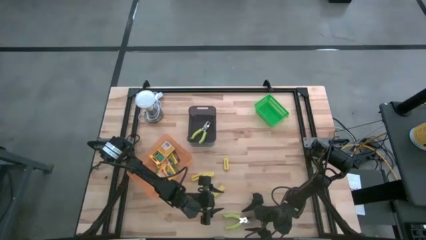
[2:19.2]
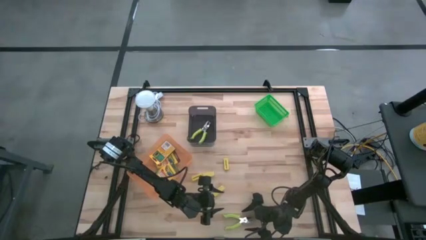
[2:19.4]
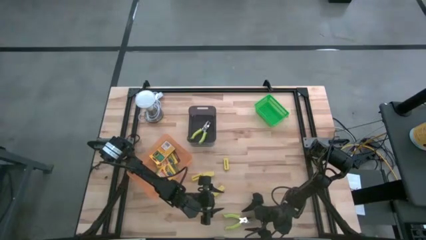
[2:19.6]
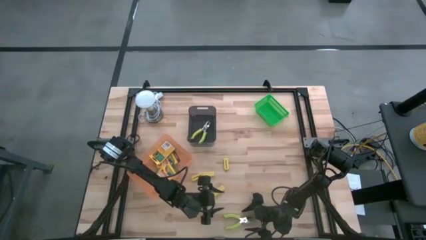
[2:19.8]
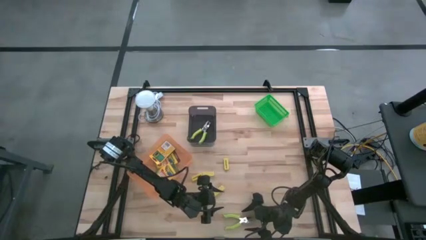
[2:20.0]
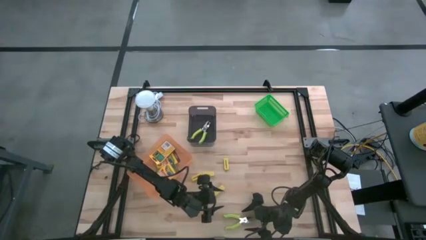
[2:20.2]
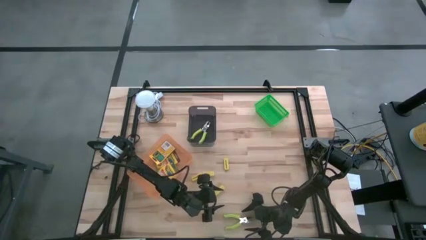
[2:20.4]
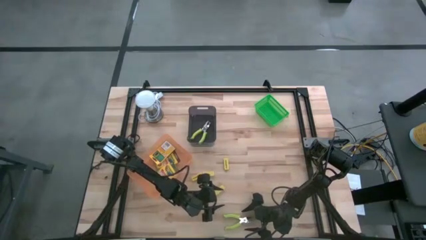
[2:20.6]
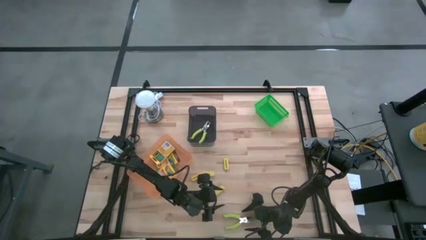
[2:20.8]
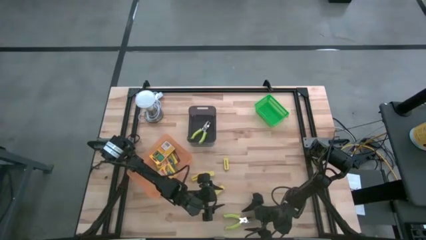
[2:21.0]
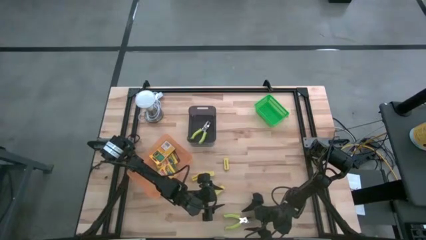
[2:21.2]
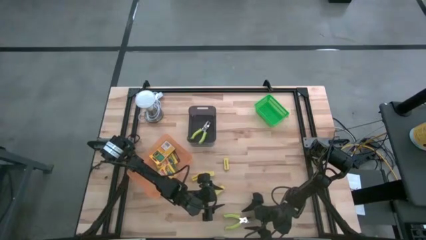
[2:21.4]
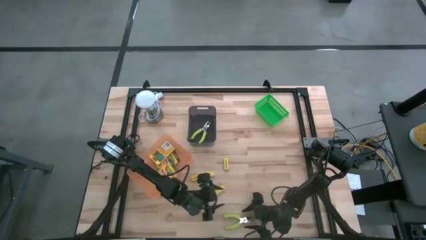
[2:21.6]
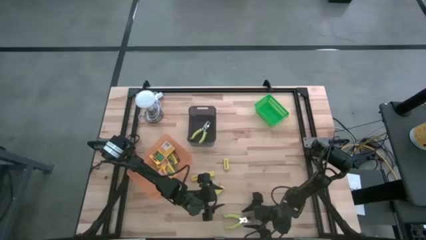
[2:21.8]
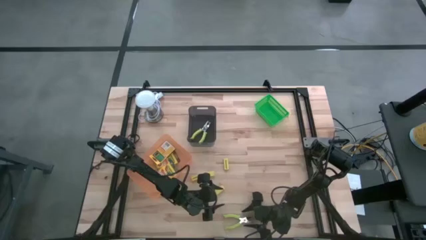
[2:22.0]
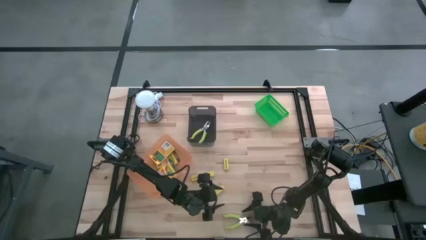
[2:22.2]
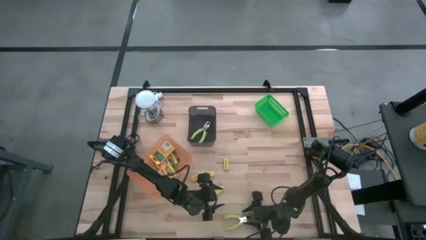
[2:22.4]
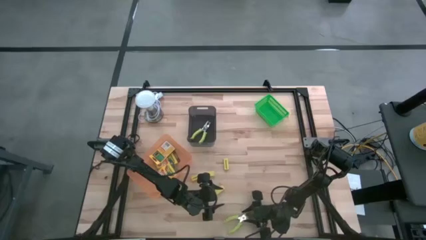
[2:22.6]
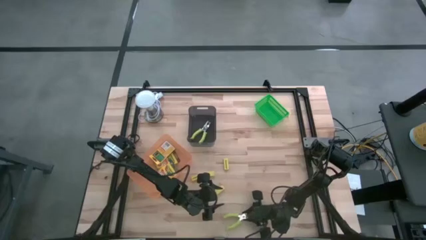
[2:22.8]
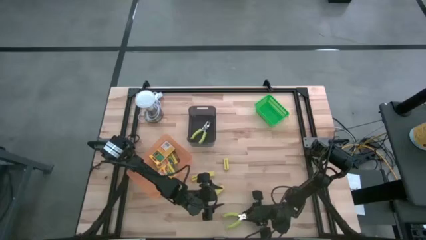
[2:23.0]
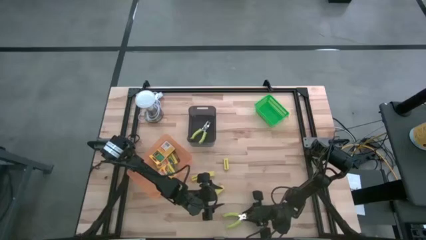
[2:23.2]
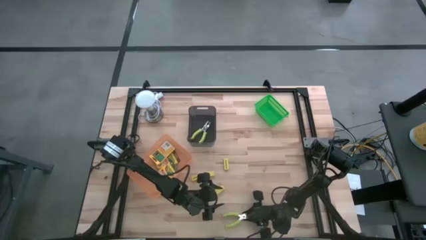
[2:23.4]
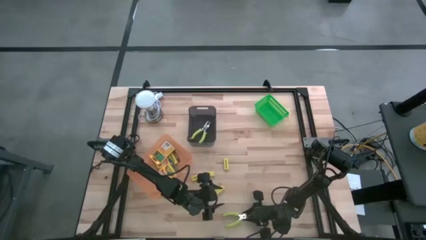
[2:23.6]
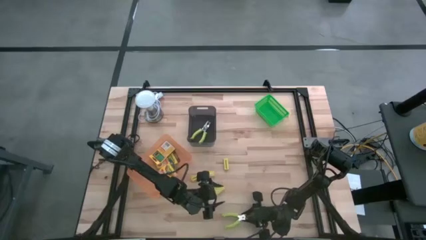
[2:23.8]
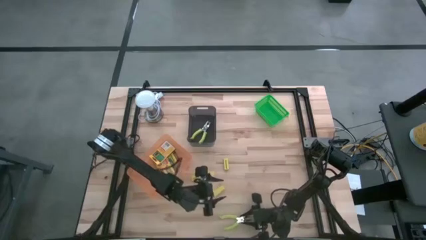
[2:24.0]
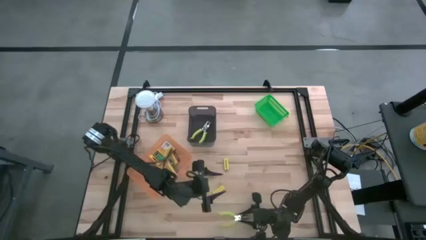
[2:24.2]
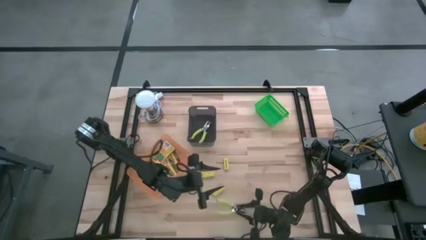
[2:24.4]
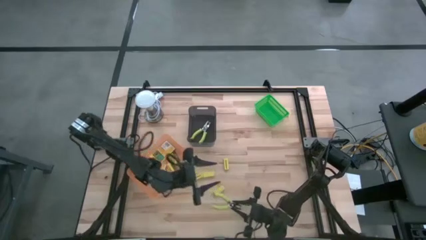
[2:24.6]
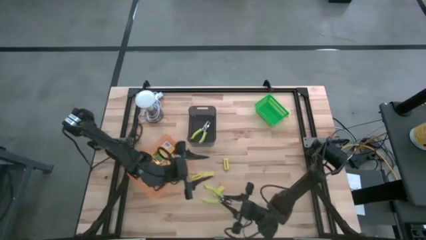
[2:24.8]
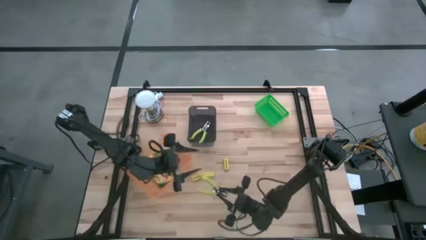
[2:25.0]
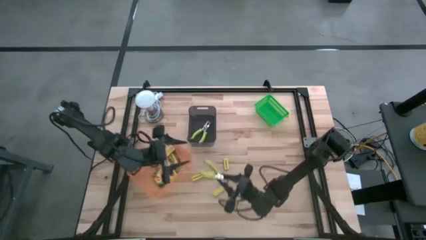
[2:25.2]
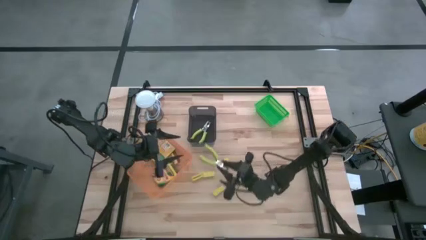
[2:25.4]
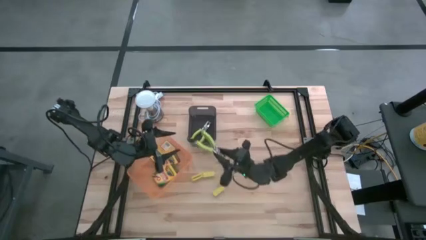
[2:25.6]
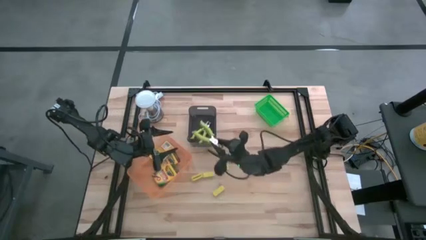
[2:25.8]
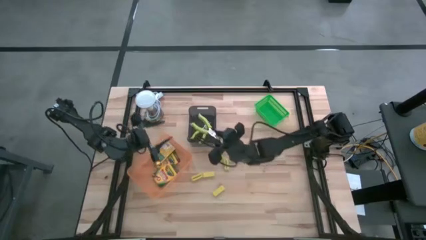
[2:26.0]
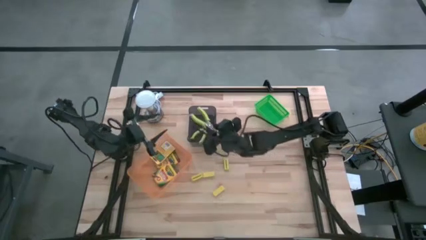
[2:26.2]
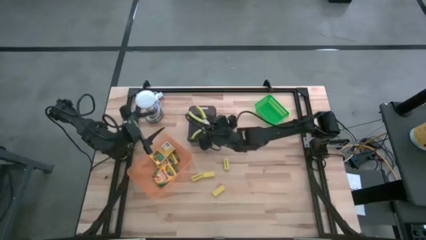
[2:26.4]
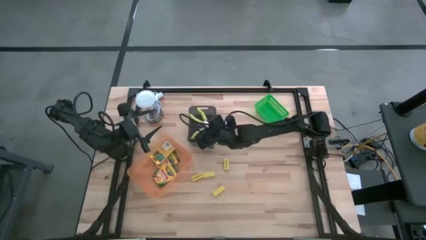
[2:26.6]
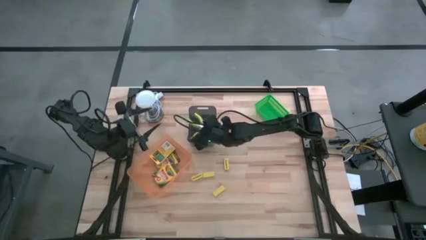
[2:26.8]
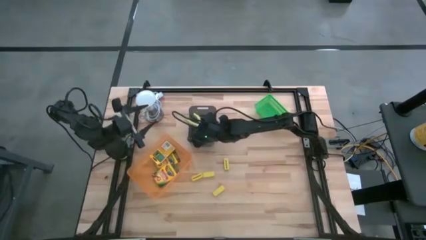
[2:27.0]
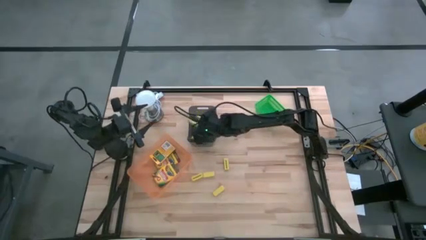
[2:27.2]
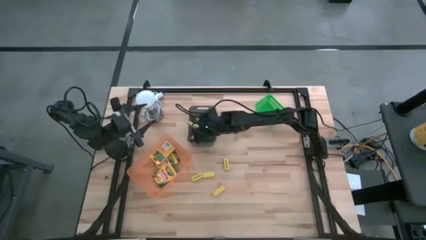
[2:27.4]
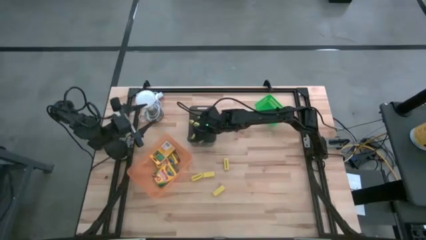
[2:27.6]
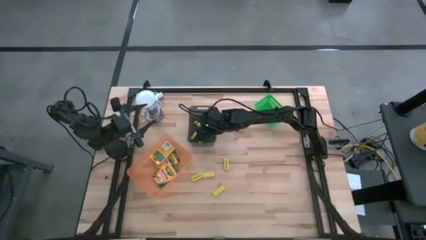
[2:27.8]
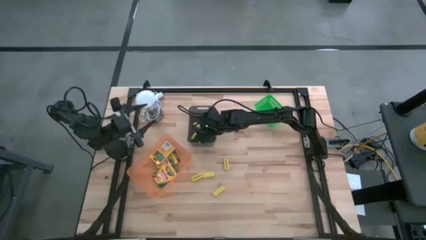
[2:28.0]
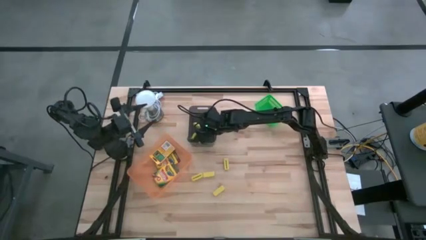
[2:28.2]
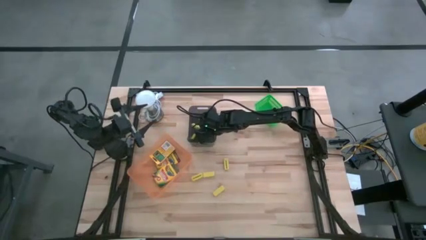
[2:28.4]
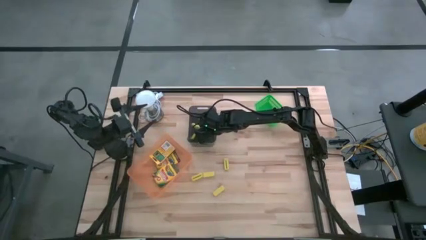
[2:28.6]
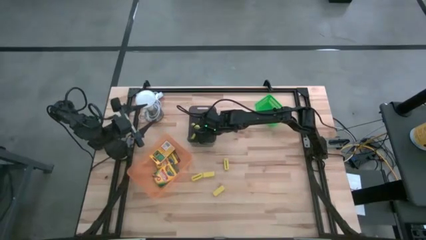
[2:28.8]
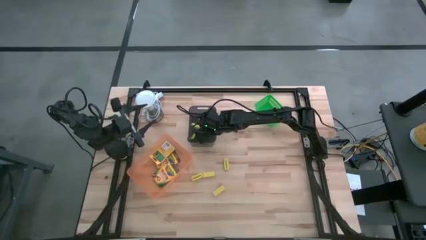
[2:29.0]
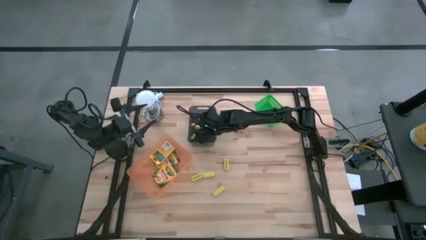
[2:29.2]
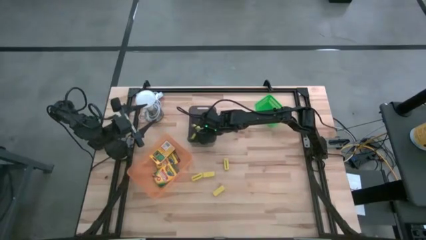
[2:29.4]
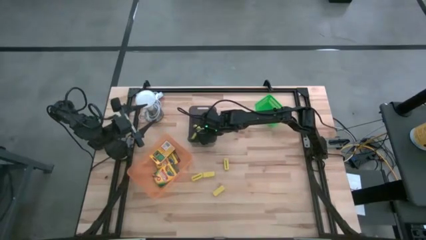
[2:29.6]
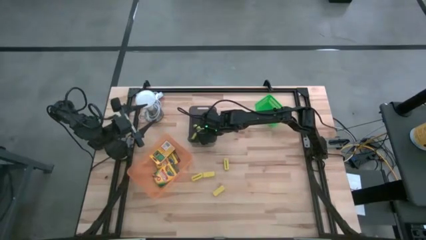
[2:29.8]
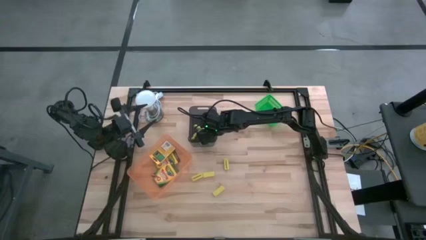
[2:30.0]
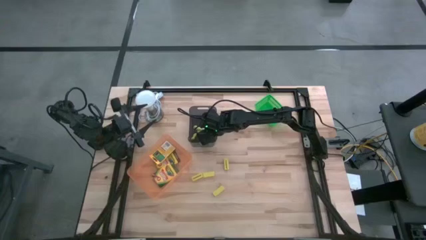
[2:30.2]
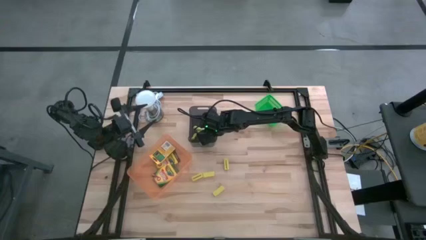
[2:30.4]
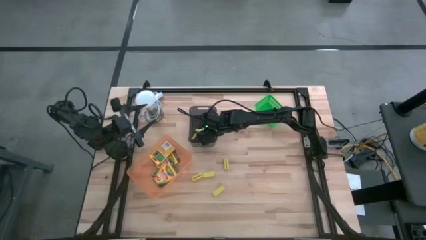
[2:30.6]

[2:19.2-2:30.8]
Task: Pick & Place School Supplies
Put the green punch plier into the black bin
